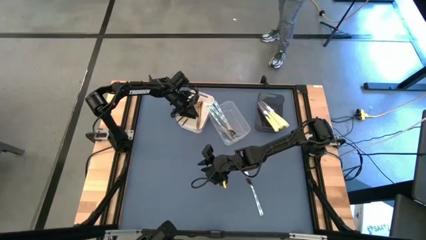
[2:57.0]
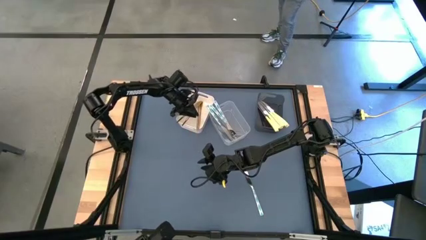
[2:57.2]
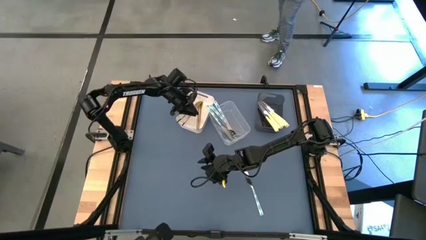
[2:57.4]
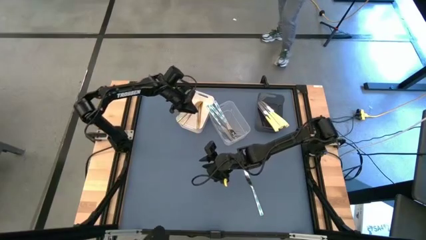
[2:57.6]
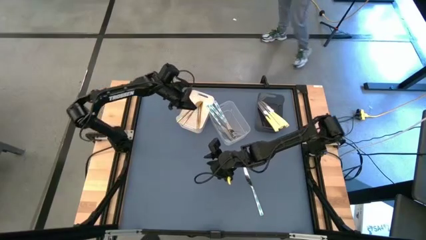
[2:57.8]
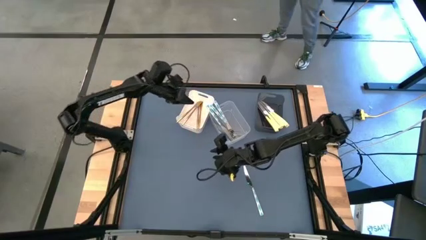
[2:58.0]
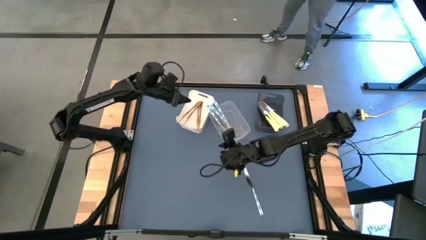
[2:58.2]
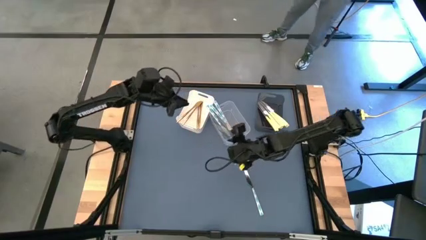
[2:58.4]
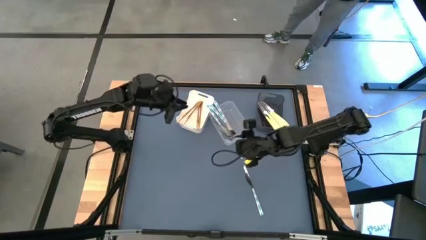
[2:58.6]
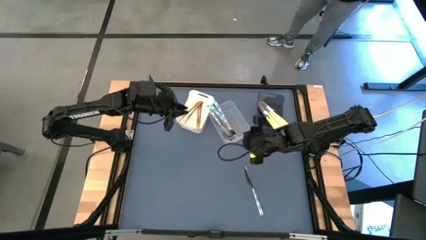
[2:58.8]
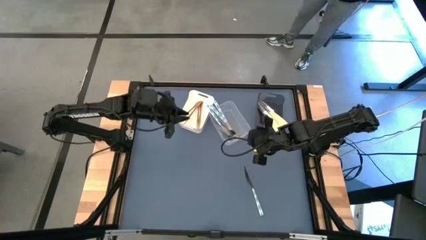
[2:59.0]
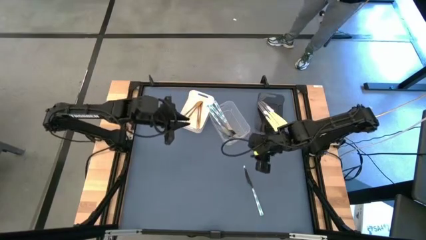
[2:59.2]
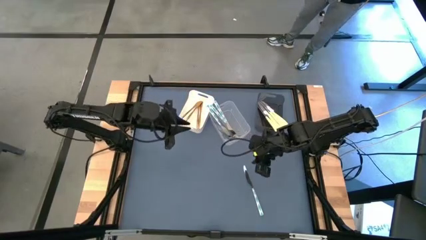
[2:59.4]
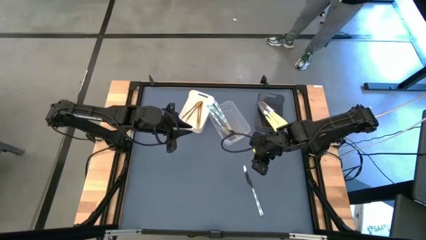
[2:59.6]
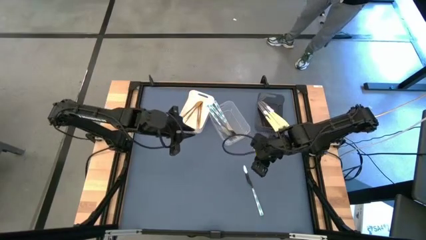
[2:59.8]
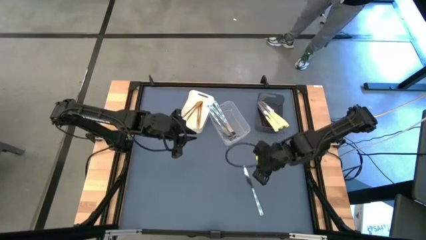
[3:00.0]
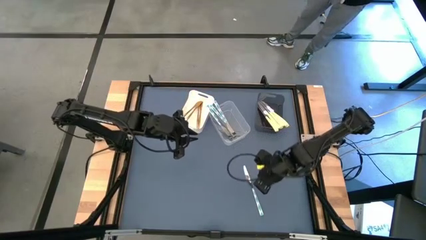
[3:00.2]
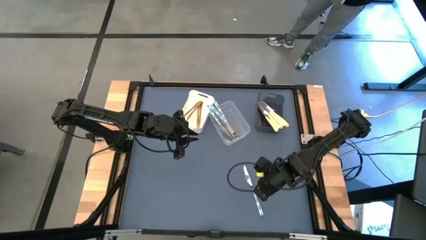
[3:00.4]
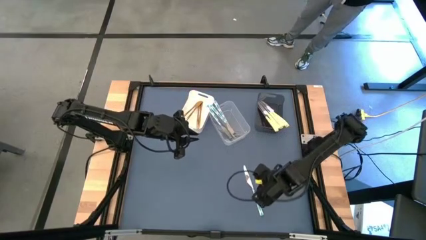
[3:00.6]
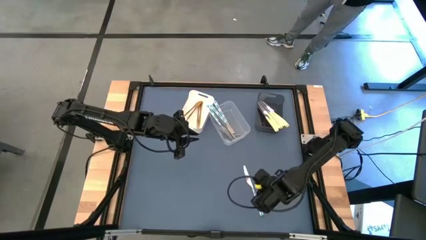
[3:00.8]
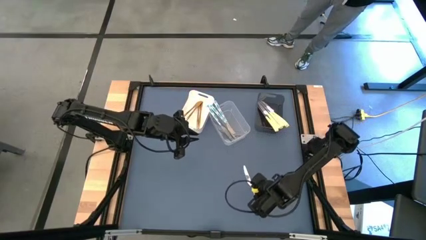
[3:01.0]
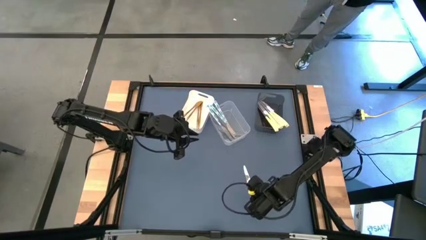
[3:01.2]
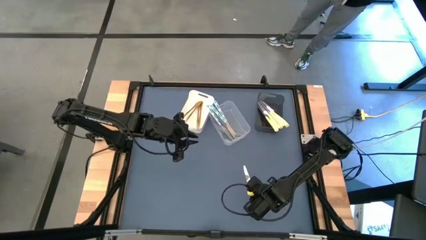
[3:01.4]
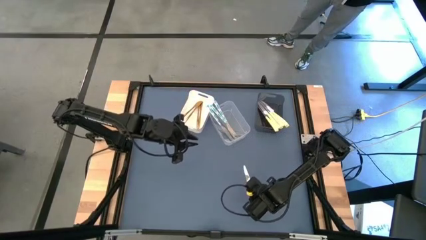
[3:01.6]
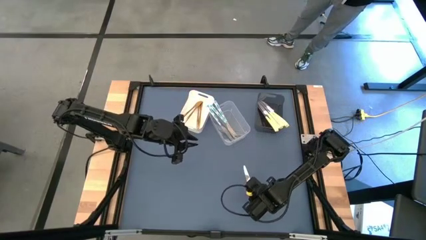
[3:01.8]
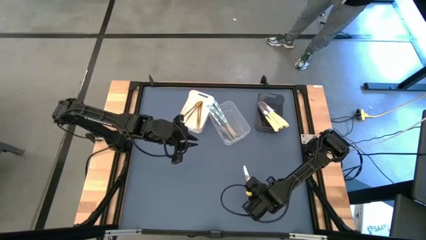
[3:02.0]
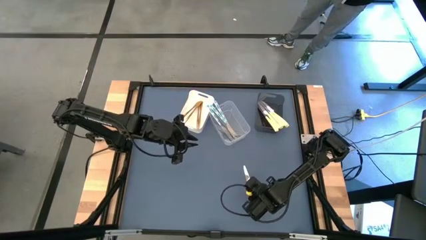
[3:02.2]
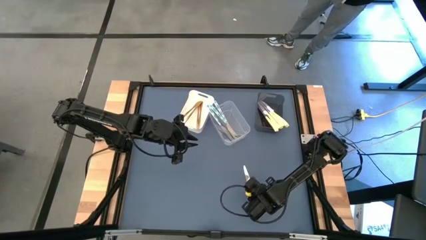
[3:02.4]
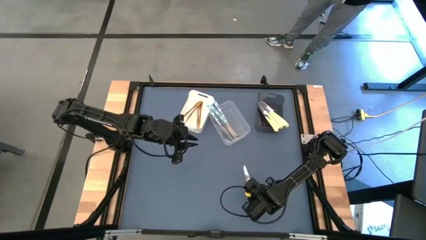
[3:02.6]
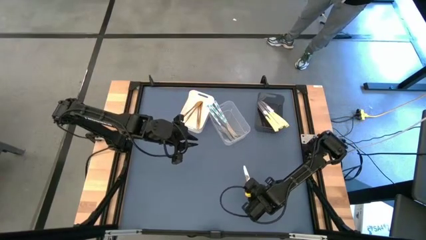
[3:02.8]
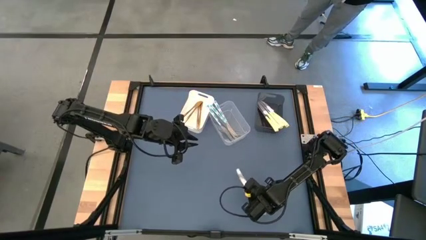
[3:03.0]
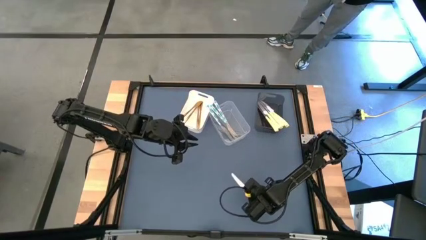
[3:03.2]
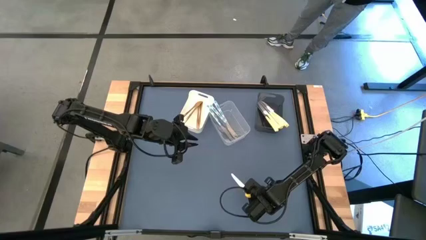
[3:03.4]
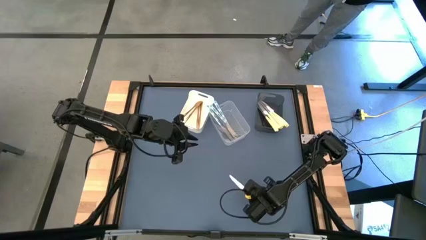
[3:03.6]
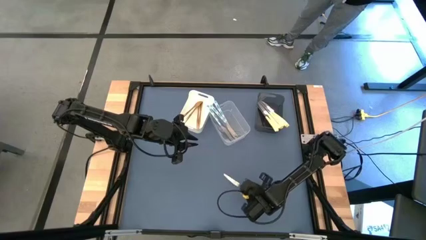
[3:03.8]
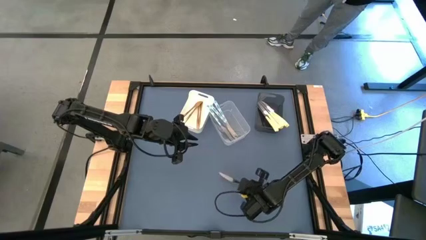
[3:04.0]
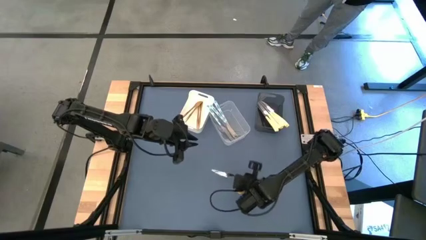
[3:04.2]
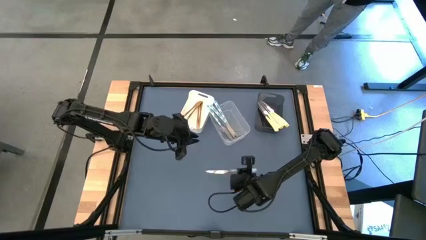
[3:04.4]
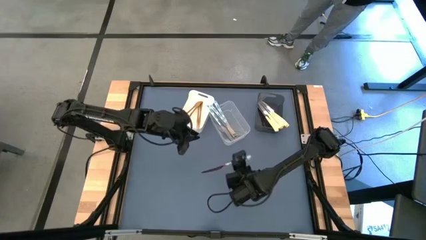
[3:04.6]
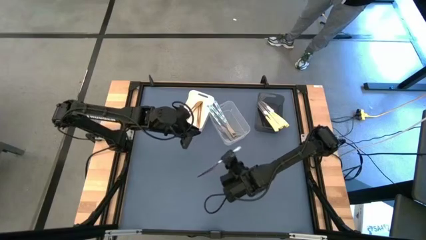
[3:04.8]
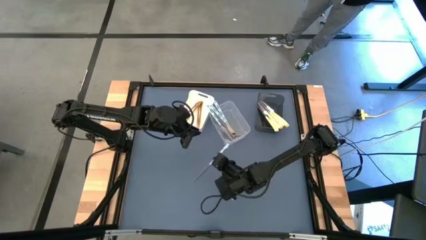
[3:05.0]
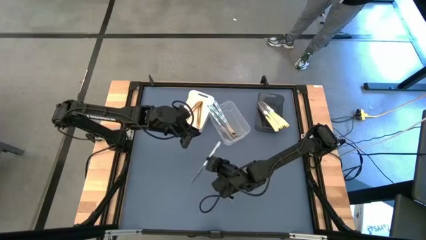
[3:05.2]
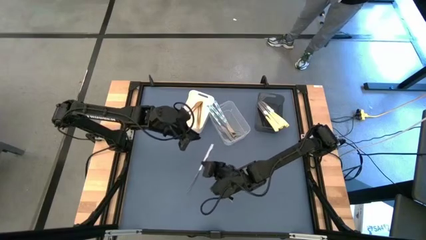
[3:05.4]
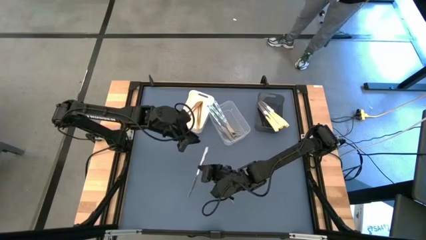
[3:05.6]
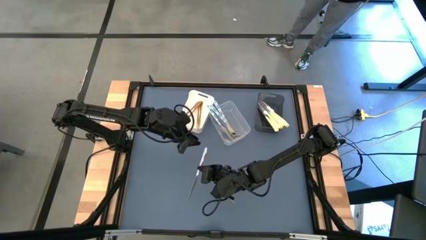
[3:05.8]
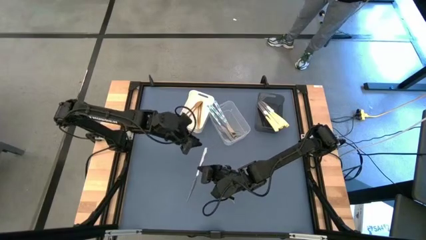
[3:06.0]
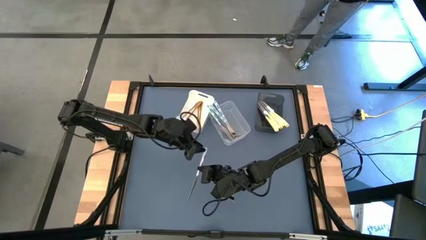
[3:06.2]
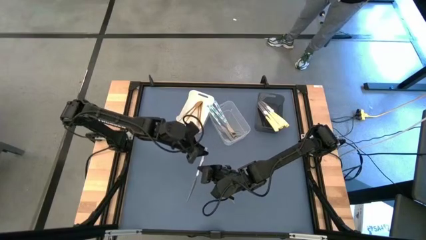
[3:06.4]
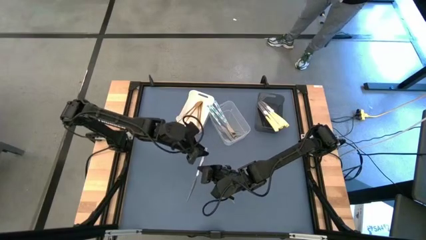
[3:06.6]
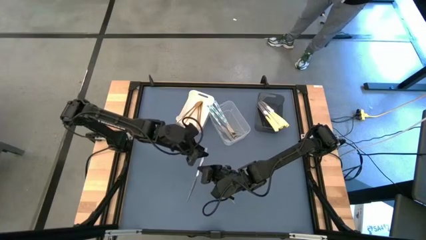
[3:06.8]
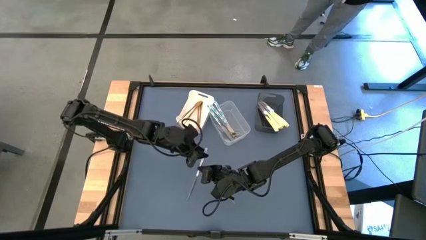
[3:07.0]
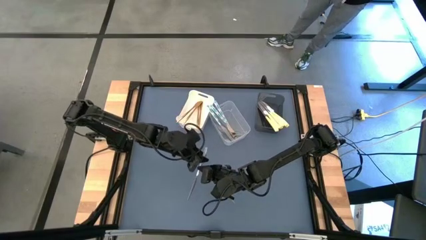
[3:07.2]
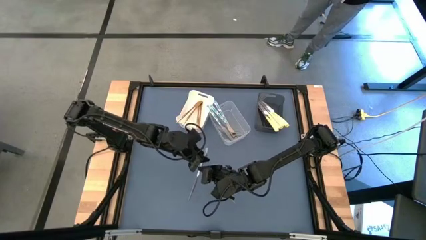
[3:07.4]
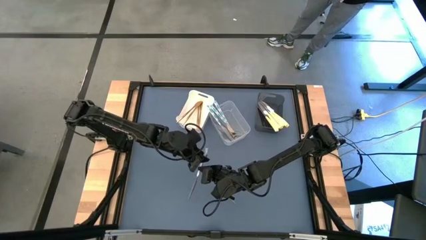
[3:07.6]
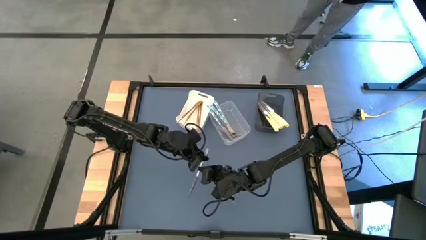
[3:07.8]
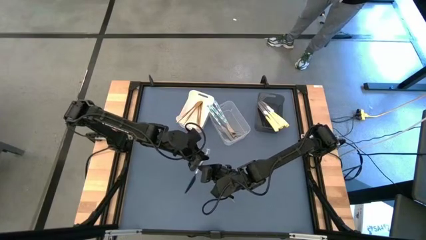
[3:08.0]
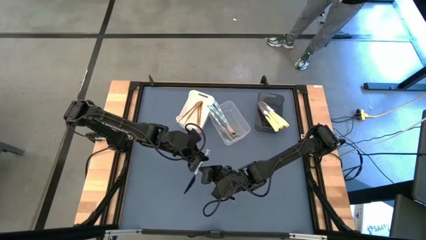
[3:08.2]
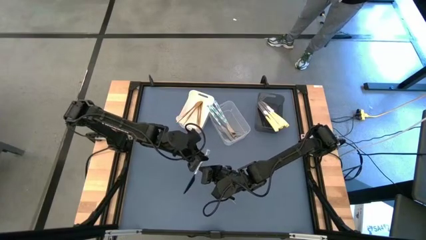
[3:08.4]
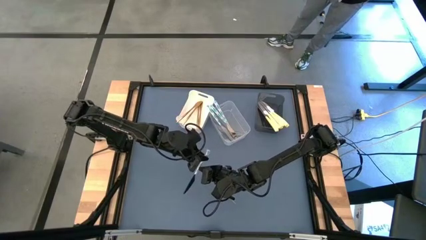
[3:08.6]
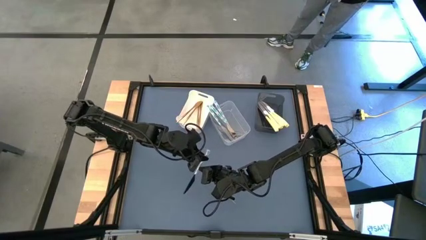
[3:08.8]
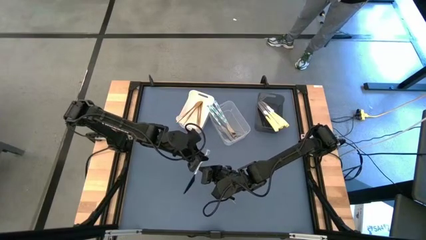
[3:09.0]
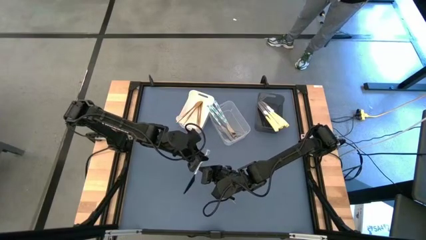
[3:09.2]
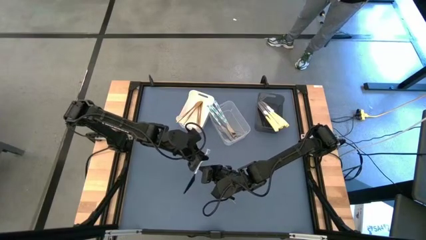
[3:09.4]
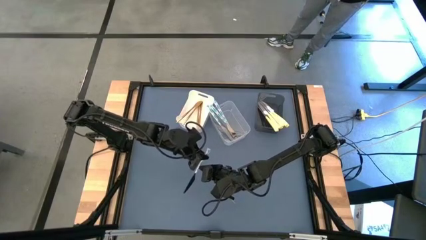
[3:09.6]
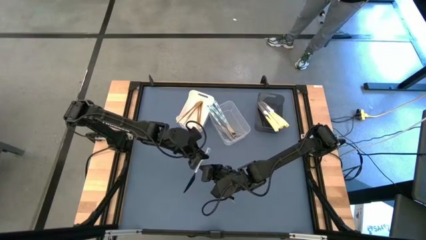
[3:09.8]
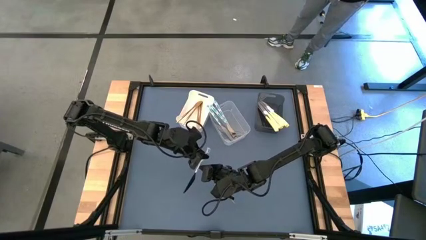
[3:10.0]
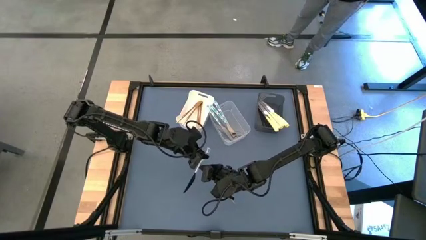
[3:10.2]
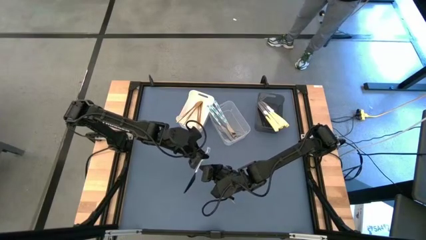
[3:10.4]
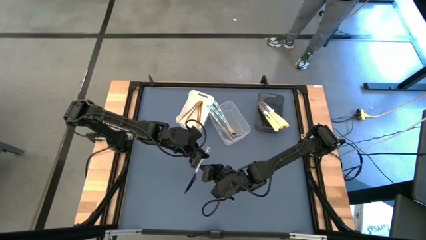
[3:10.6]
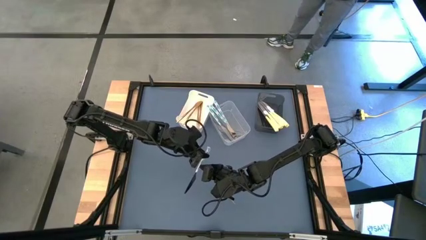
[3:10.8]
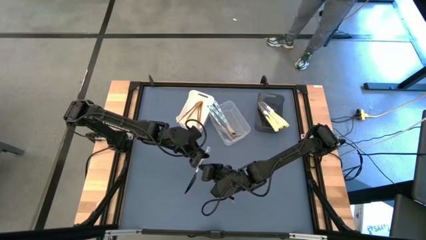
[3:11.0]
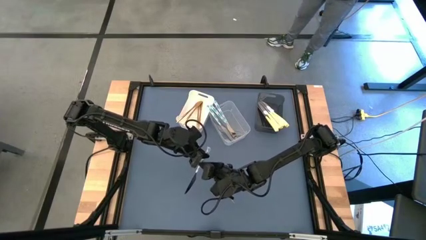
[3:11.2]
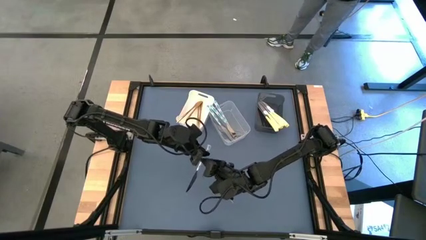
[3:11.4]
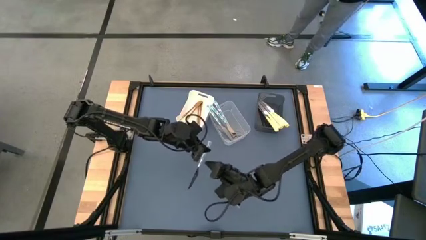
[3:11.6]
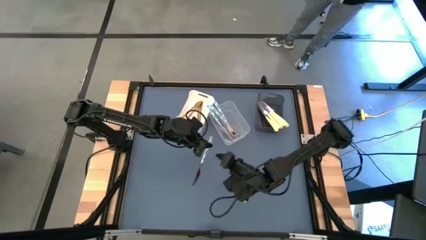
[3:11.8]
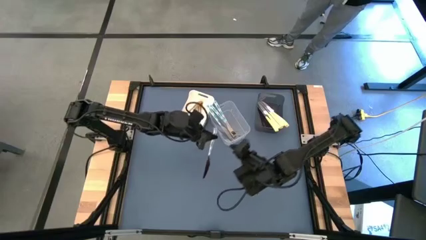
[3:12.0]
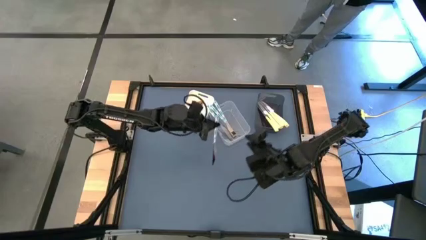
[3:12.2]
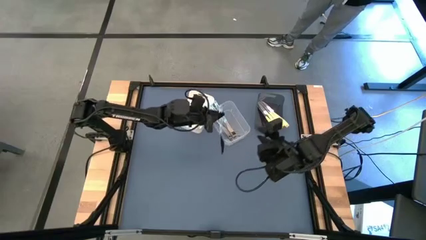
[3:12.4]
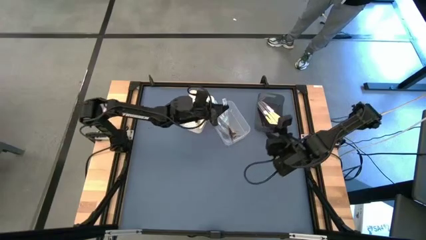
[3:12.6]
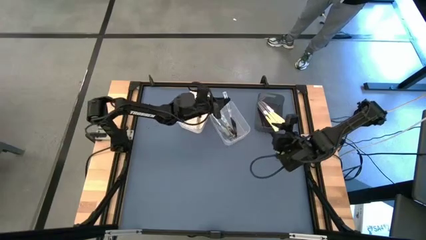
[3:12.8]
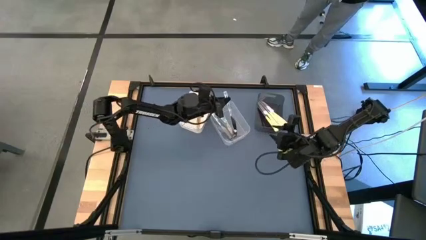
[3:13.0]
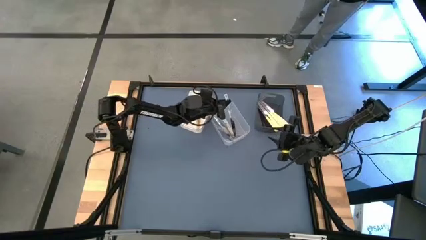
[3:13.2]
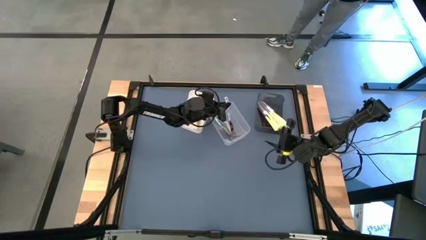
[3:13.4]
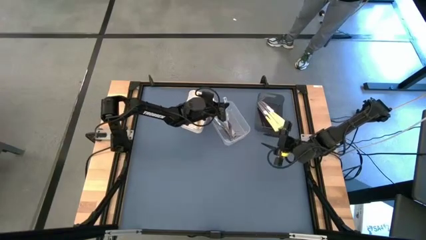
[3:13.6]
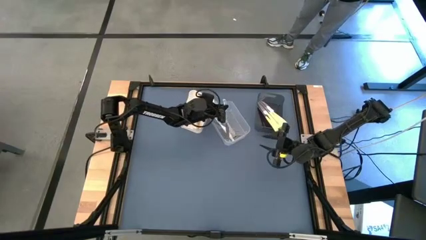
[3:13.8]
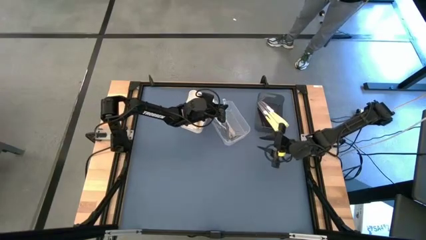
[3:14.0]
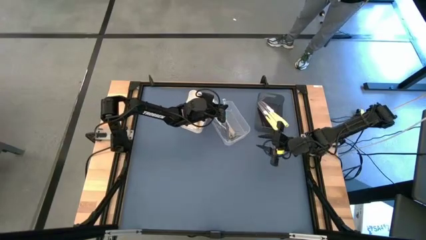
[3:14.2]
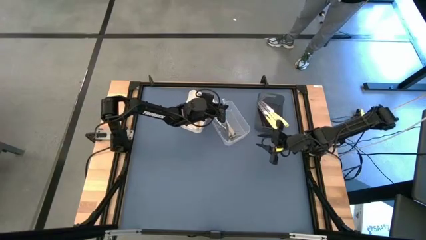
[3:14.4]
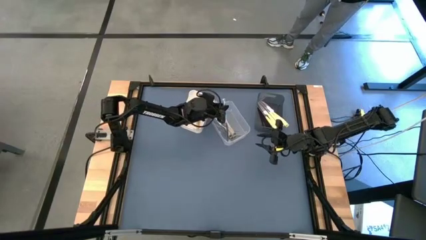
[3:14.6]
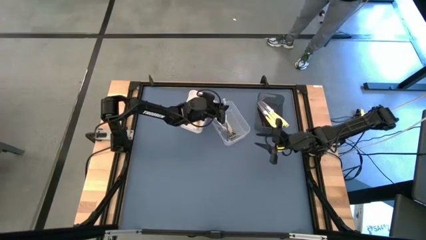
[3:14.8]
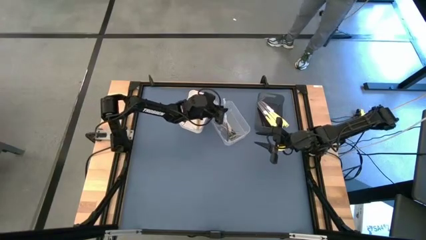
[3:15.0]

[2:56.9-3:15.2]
Task: Sort silverware by color (type)
Put the green knife into the transparent bin
